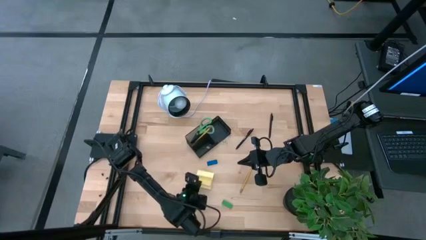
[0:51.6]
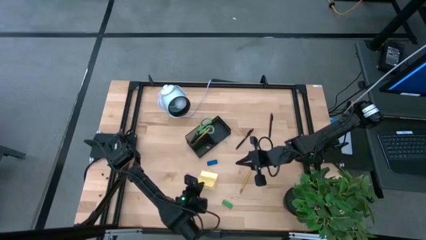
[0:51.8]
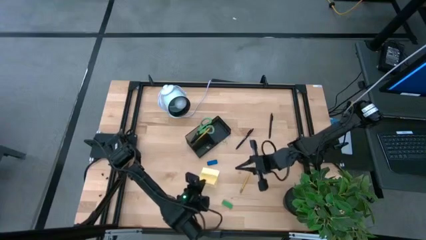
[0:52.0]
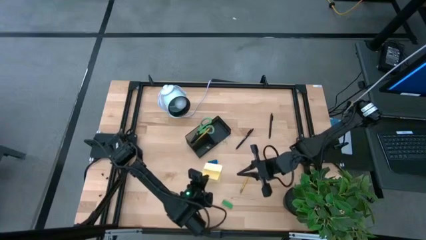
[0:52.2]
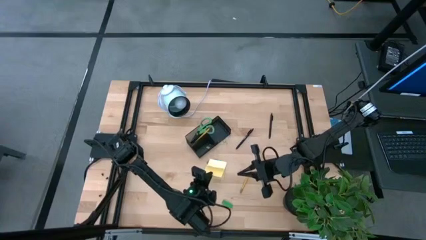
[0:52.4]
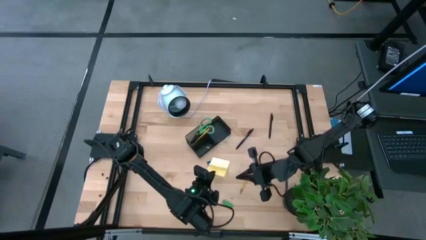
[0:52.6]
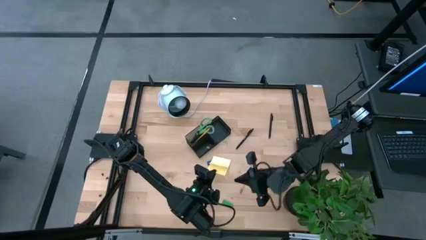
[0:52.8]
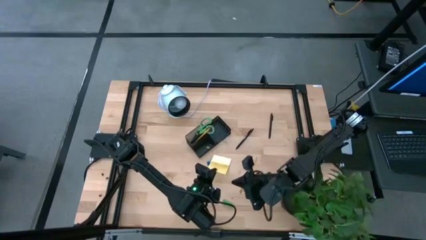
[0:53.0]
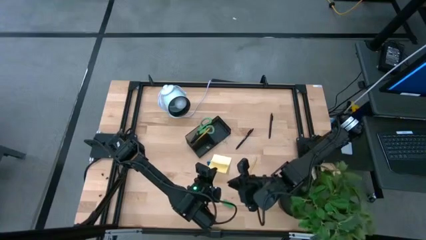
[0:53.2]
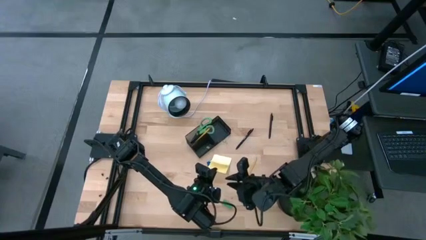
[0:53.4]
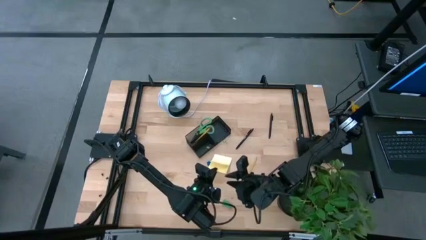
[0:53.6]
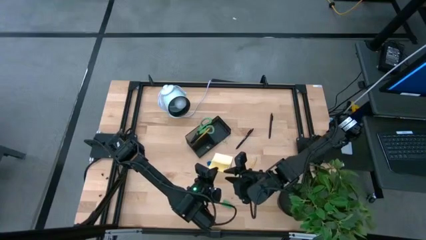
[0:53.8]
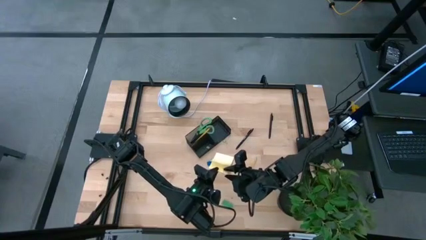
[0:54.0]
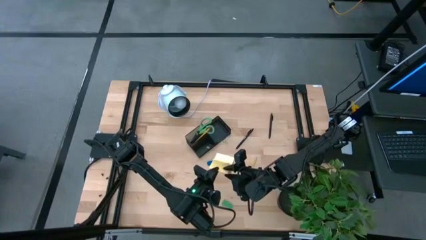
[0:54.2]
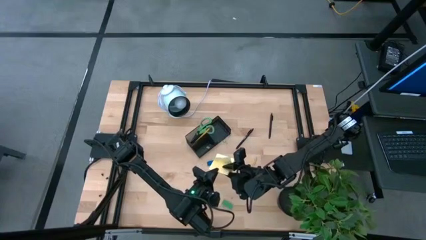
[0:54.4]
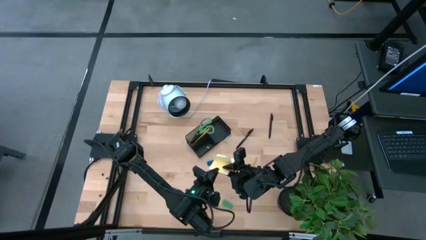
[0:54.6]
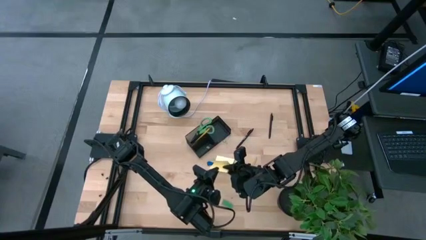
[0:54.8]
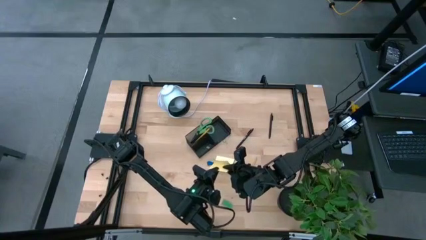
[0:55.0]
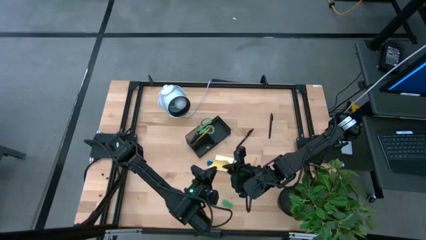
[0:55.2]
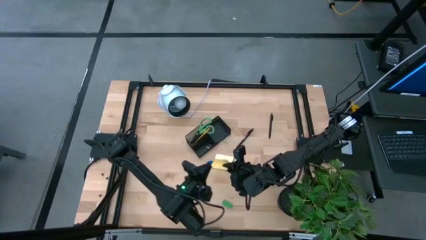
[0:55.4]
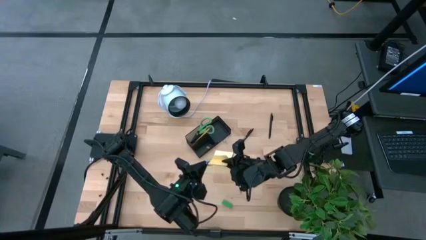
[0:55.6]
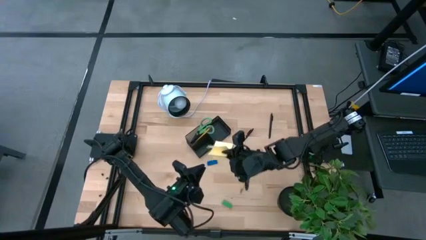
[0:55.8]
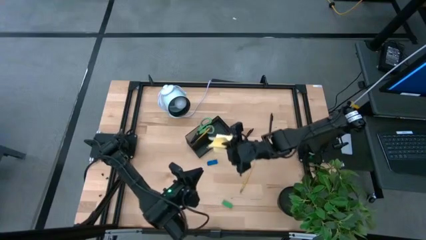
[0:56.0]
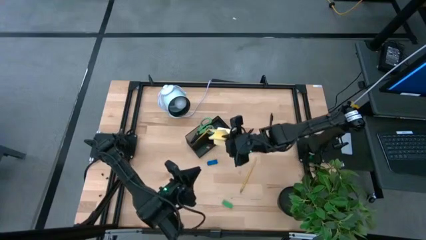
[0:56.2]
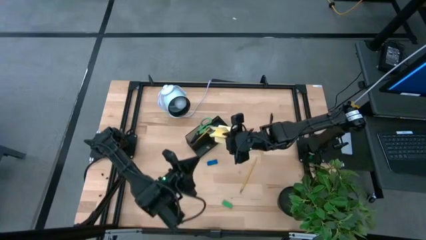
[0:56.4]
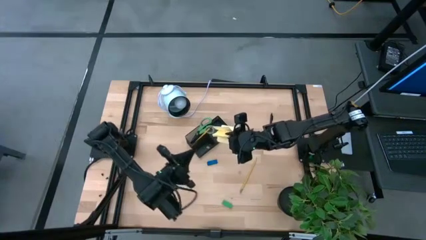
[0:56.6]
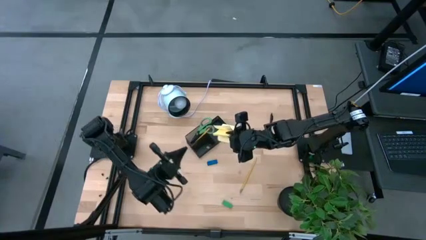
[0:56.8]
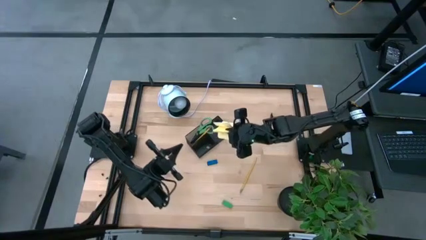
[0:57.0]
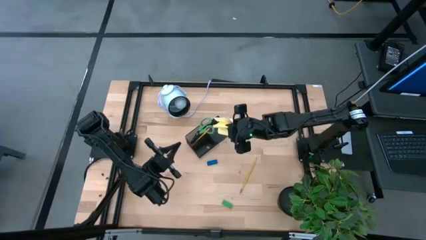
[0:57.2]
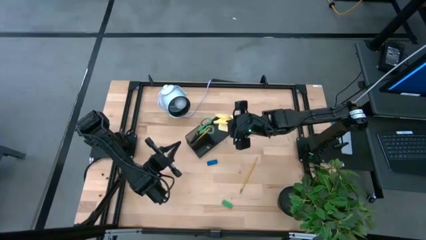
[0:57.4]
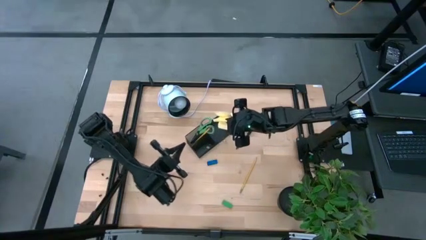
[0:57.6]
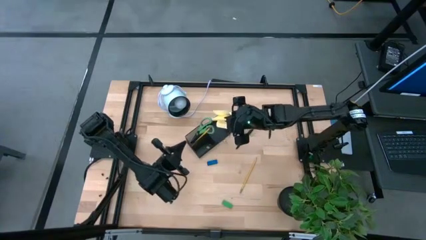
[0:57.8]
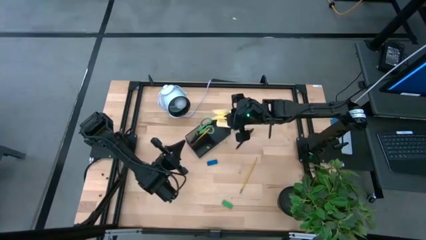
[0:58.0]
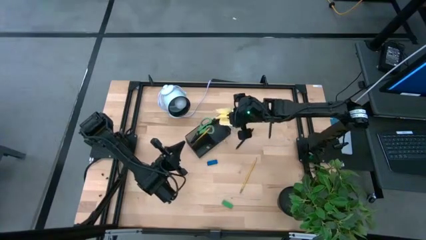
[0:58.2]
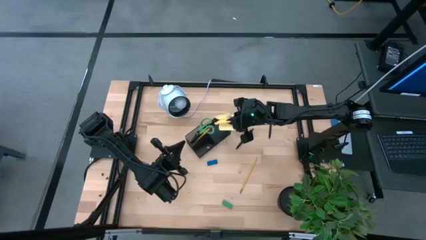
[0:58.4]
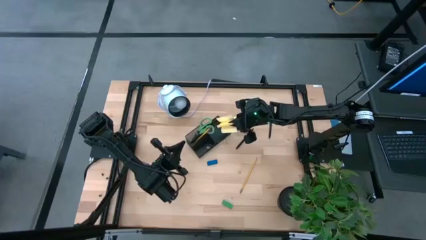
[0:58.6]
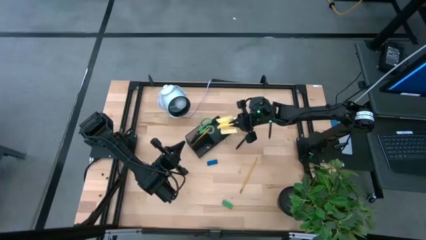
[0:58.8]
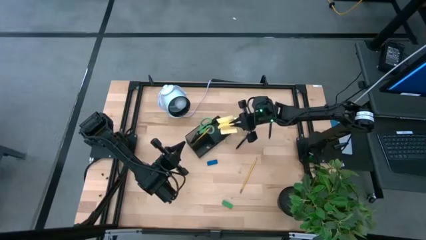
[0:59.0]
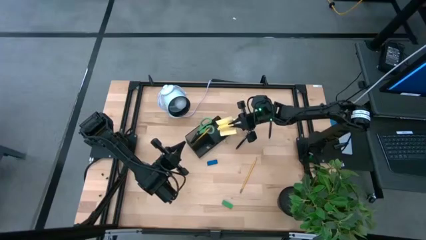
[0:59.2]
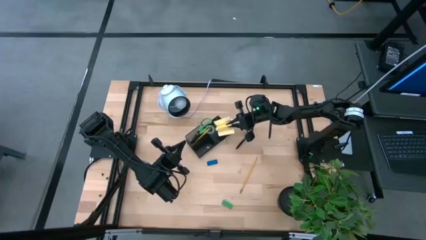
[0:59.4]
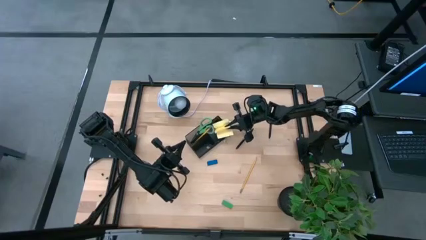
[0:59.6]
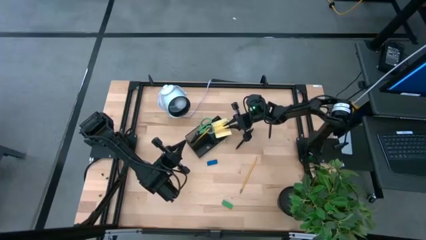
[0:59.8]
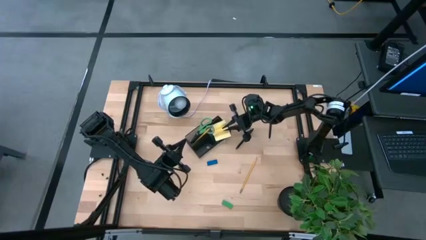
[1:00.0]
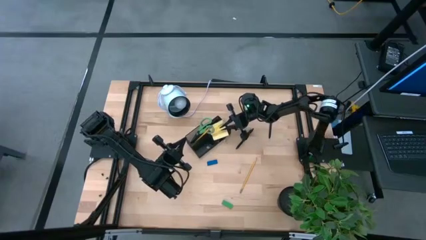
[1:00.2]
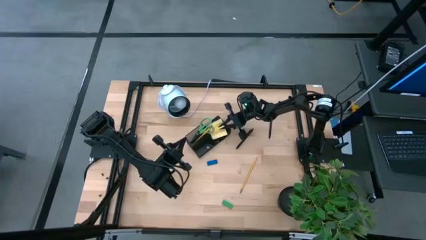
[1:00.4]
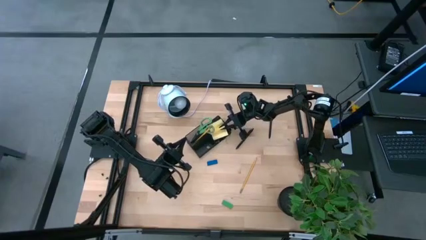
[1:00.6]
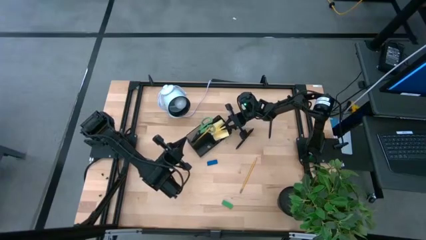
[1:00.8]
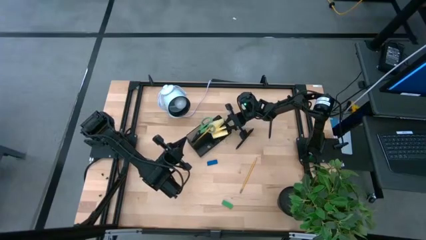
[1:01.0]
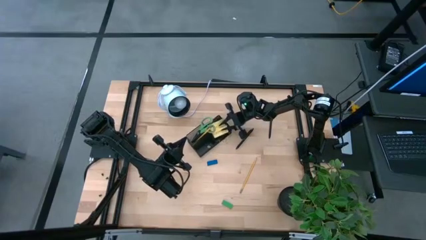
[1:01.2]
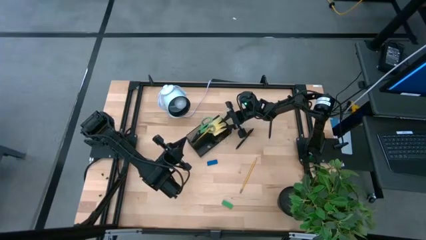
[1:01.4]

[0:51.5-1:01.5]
Task: Pick and place office supplies into organizer
Put the yellow sticky note pad into the black desk organizer
